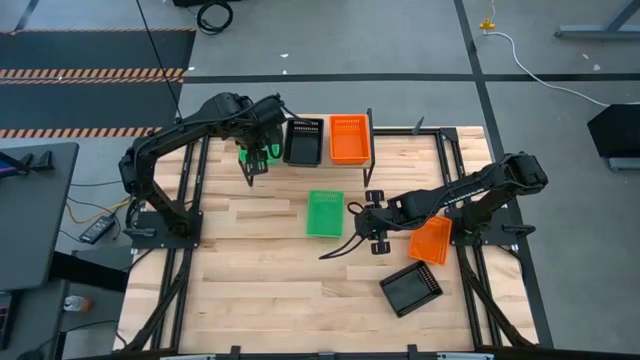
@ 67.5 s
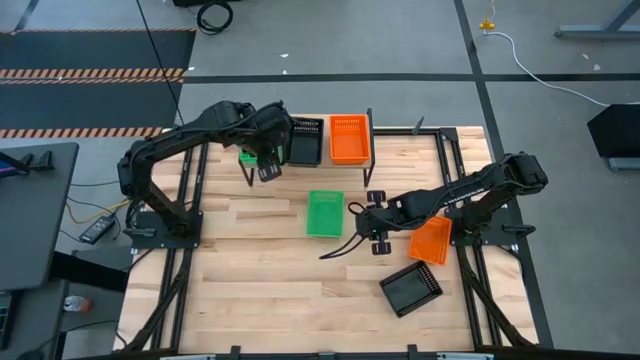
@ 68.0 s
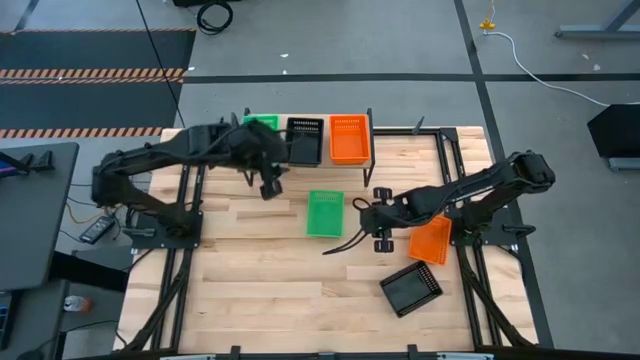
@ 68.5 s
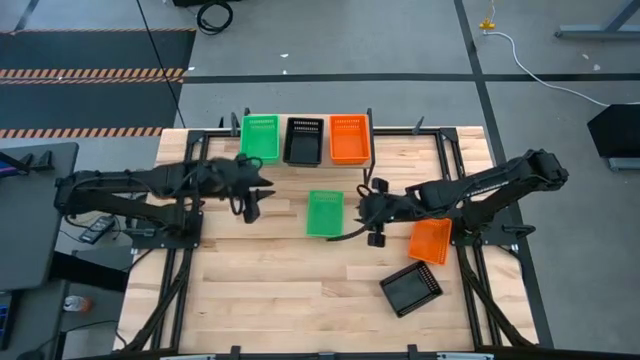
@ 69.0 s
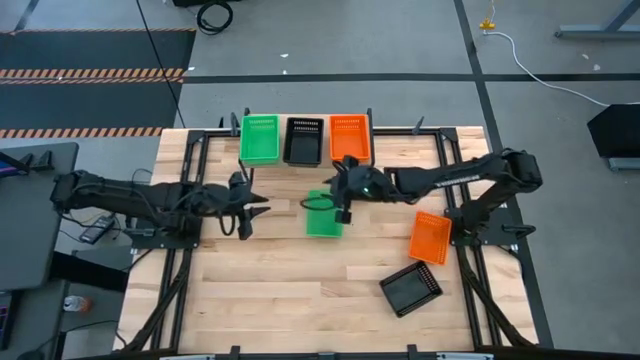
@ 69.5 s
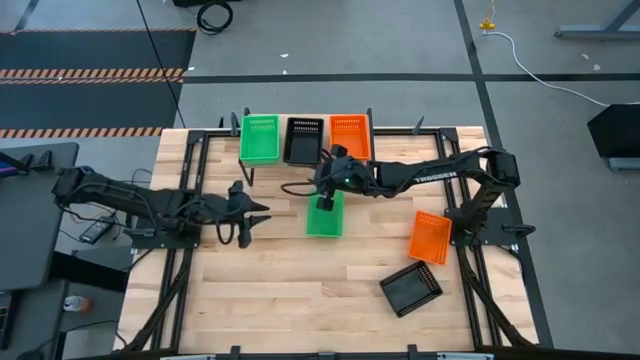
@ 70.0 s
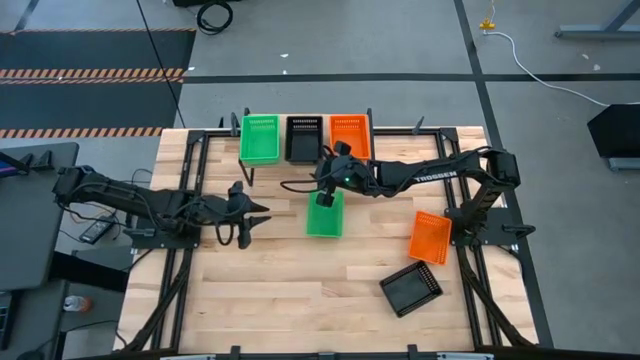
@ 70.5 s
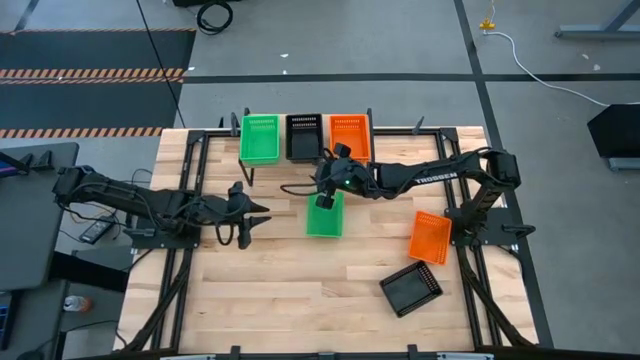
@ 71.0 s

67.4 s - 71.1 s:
Task: Stack baskets on shelf by color
Adjust the black bin

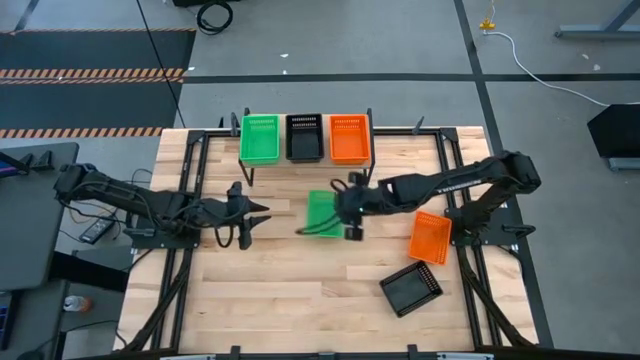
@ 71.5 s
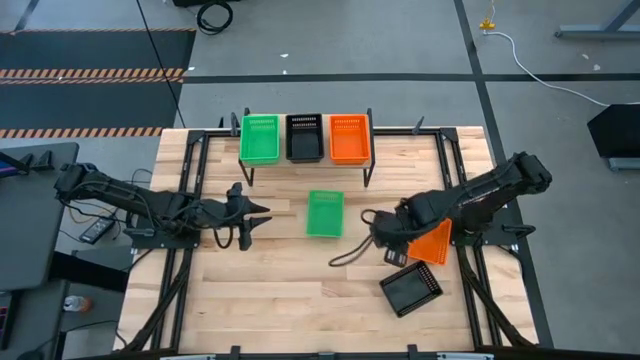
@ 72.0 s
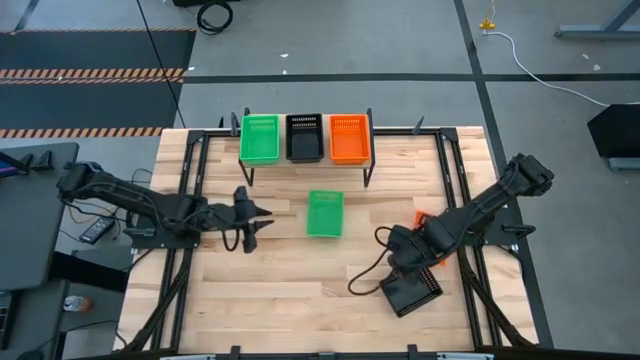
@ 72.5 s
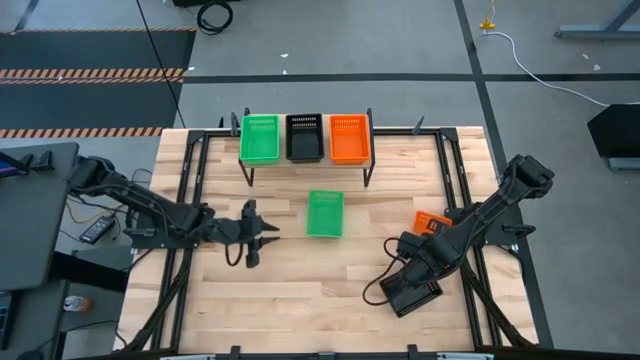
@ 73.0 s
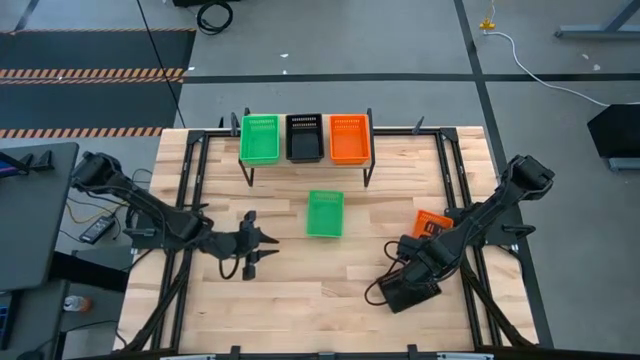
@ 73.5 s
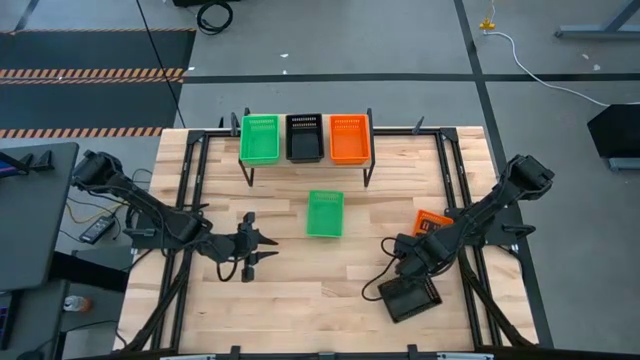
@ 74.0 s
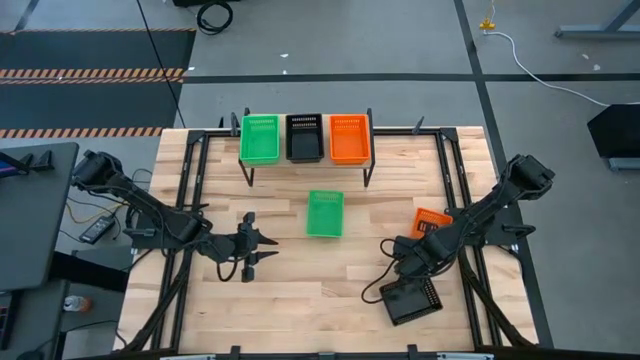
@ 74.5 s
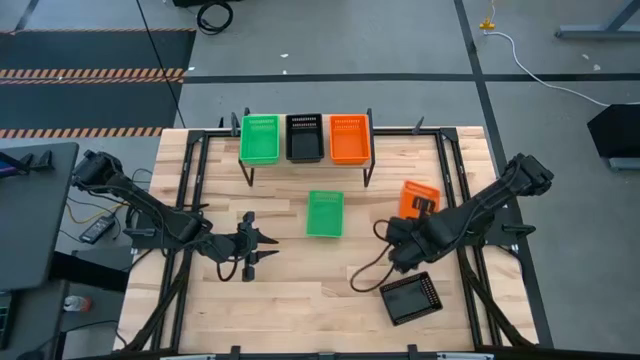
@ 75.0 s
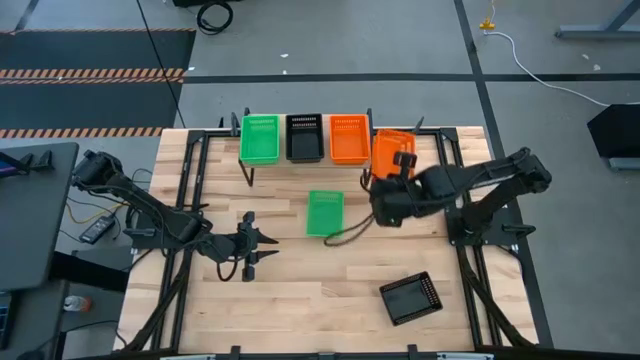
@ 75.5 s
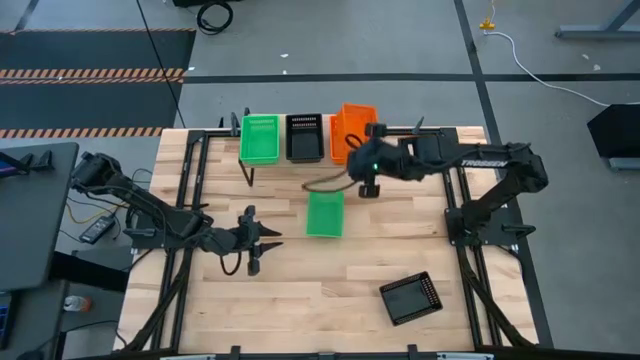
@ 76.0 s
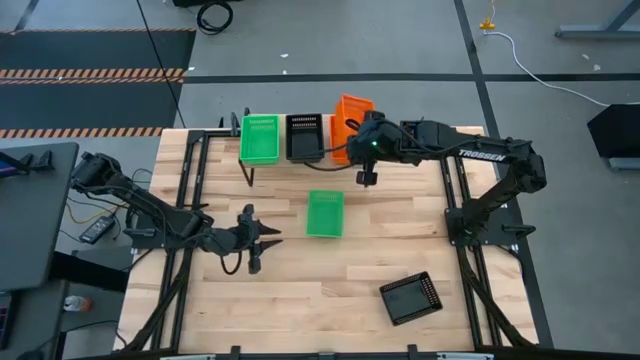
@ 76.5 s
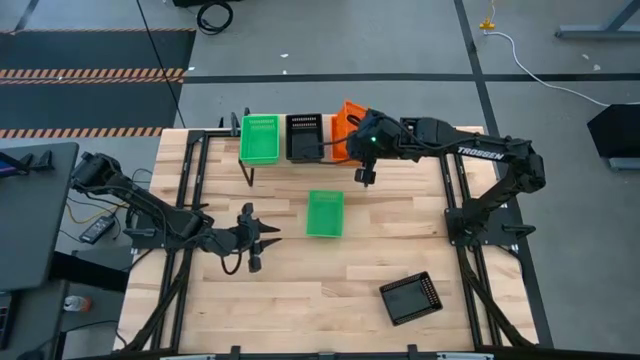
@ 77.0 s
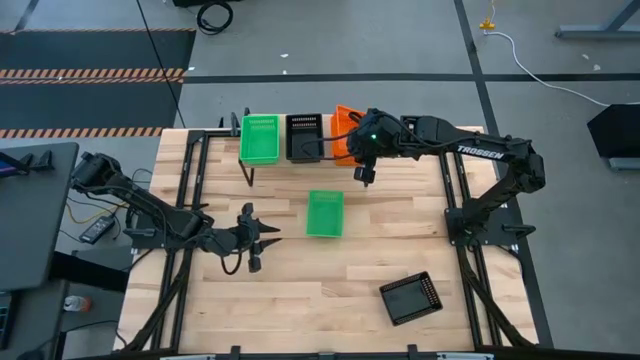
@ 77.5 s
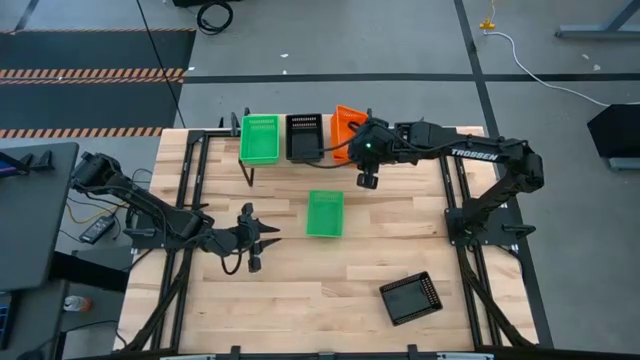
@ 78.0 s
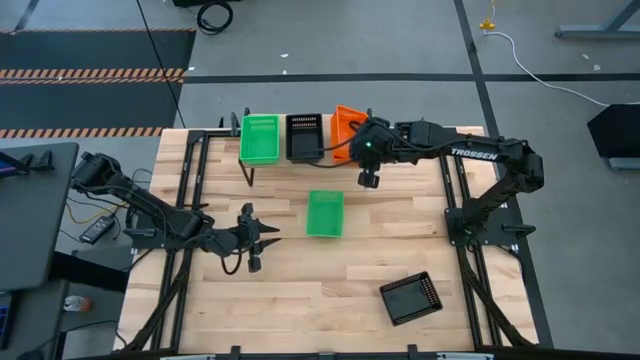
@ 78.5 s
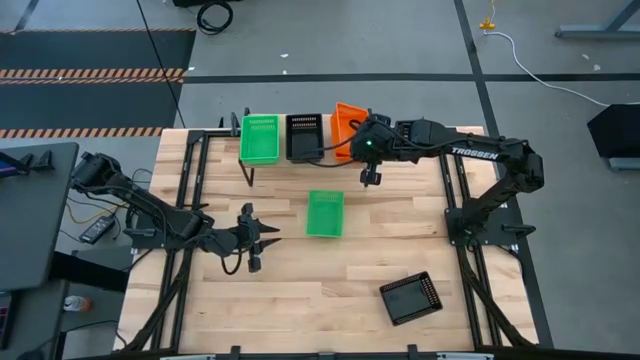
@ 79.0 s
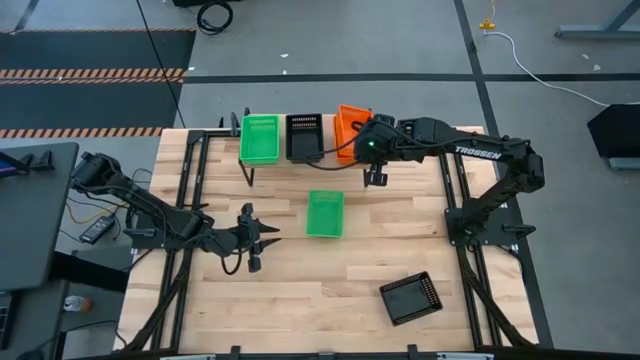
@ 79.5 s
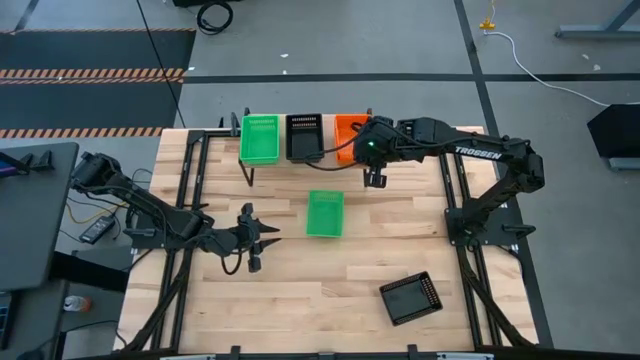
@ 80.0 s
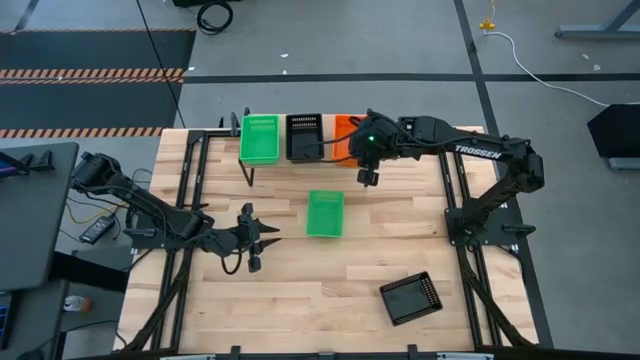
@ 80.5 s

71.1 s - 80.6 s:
Stack the orange bin on top of the orange bin on the shelf

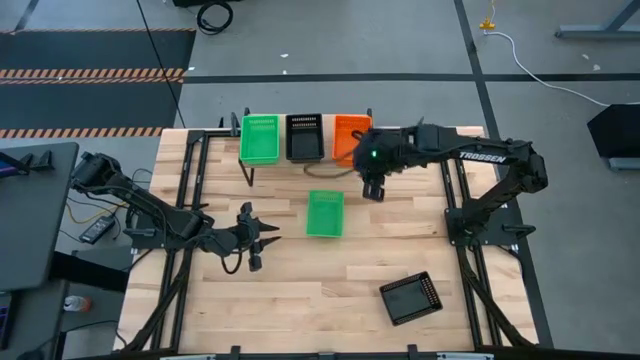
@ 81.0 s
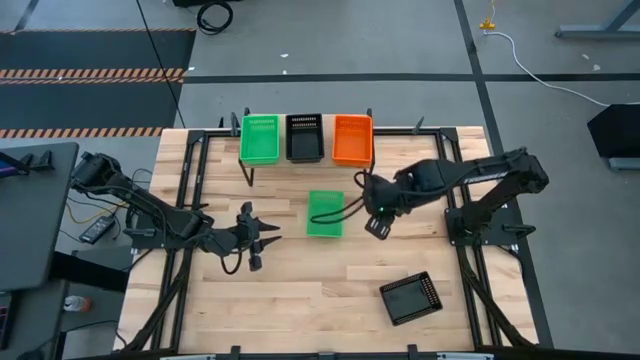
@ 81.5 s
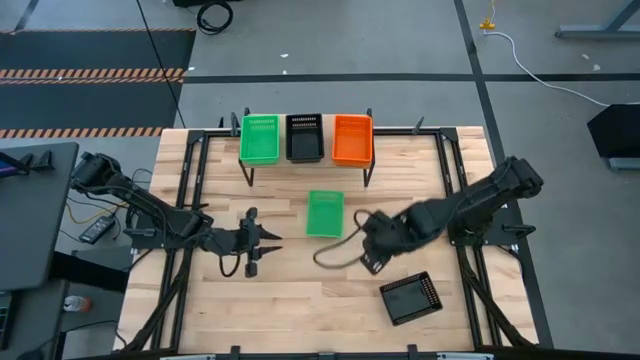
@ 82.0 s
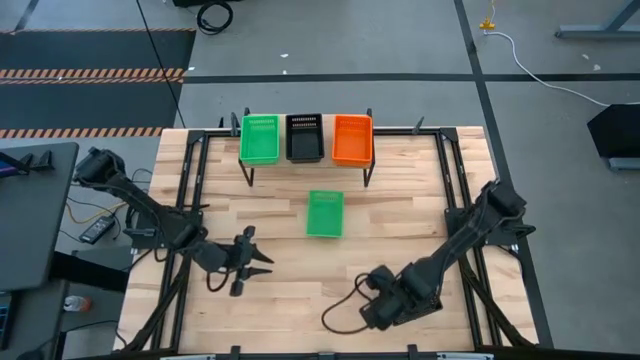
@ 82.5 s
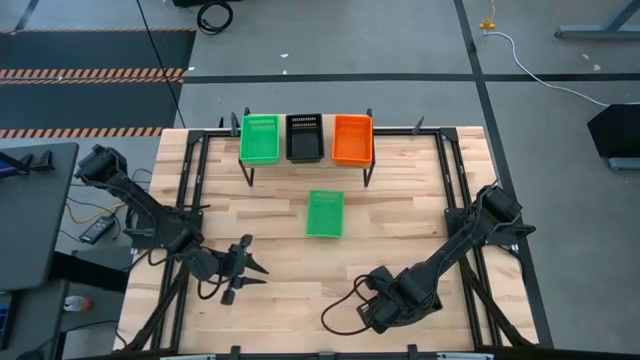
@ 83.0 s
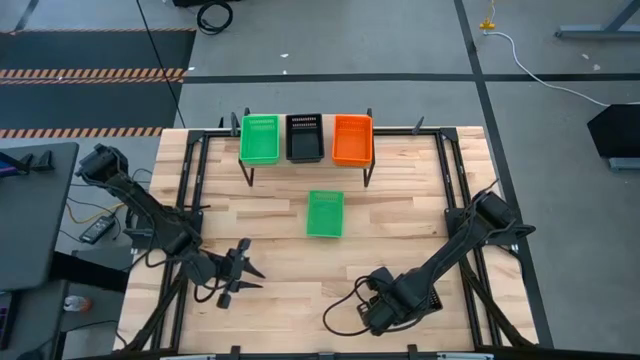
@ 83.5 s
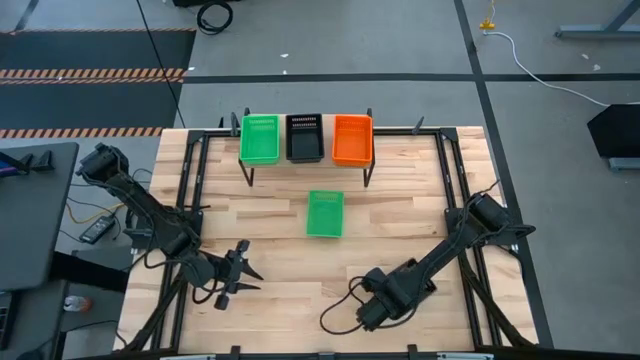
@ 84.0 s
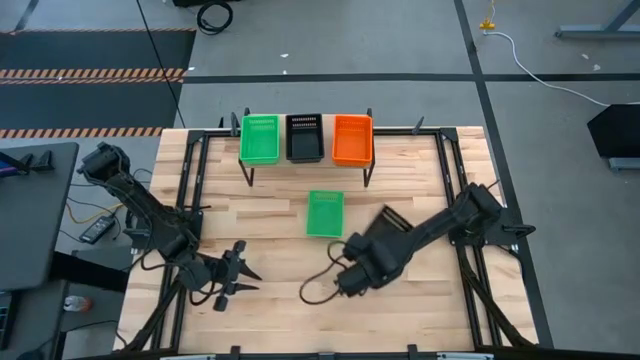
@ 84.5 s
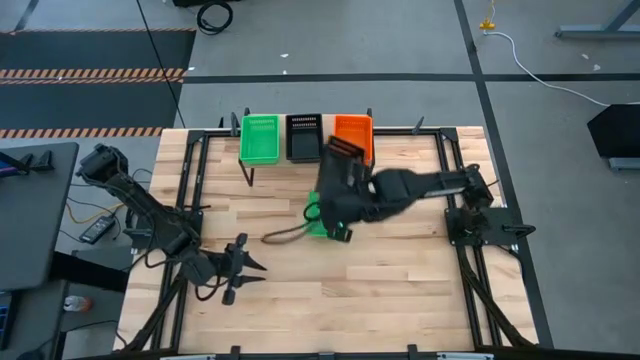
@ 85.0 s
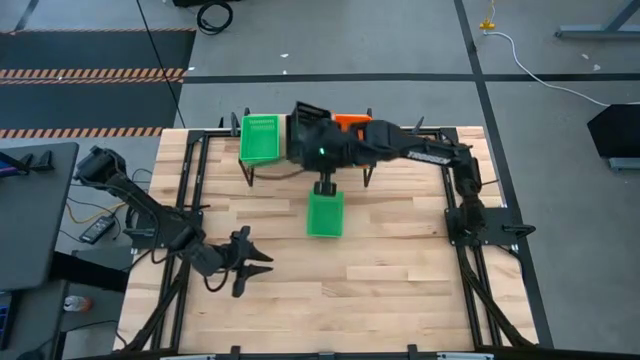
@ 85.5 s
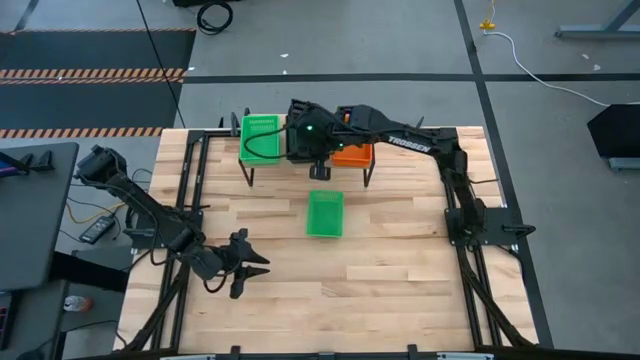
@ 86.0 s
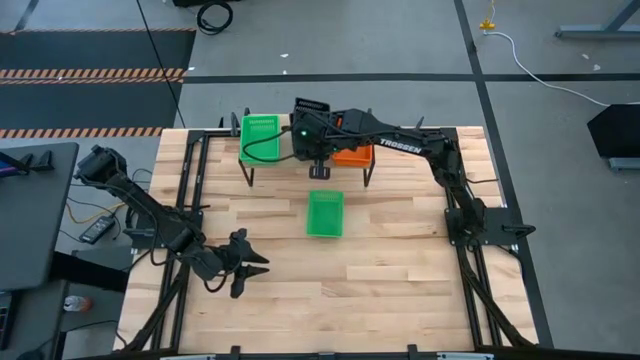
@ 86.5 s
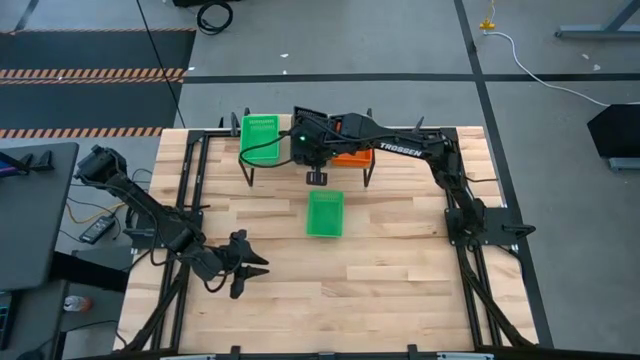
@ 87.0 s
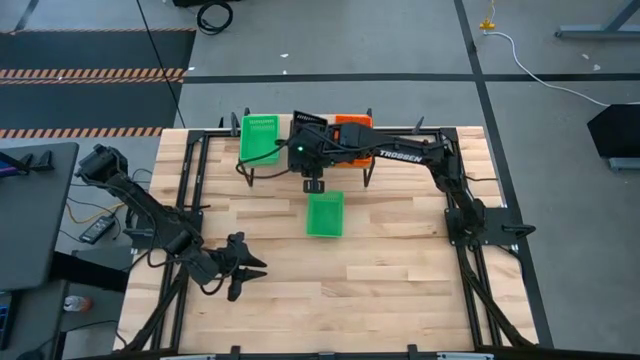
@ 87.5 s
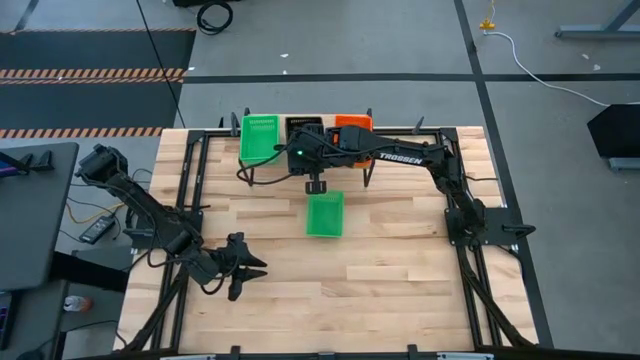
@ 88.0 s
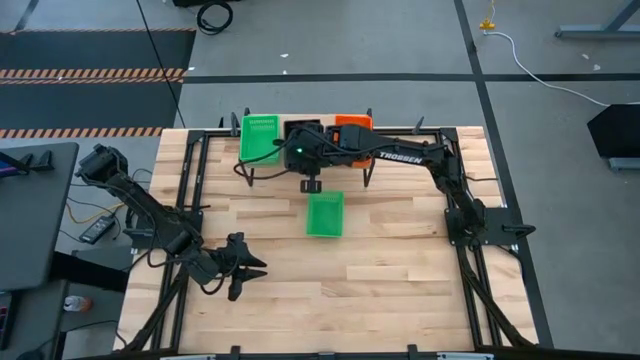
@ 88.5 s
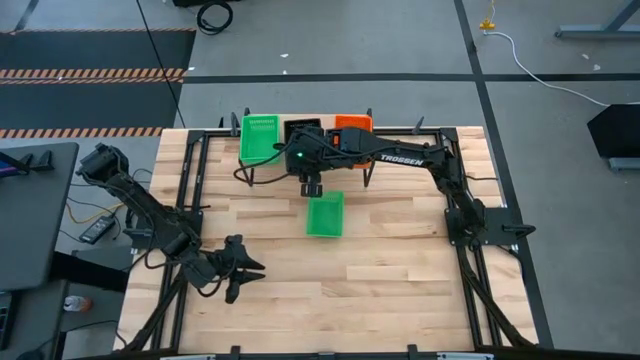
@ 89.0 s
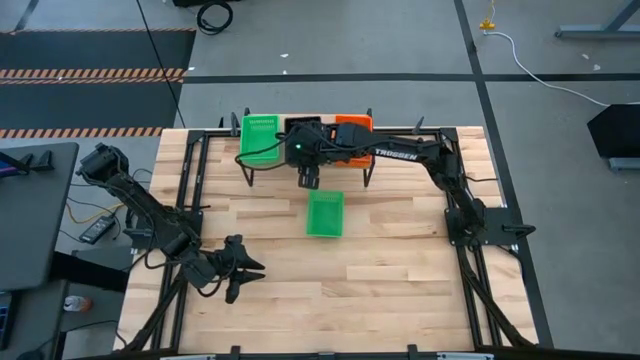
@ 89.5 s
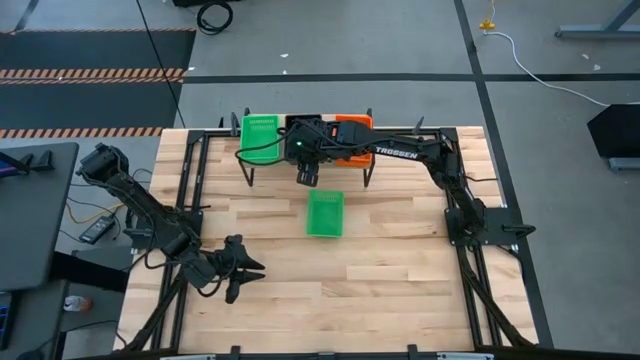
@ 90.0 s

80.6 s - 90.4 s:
Stack the black bin on top of the black bin on the shelf
